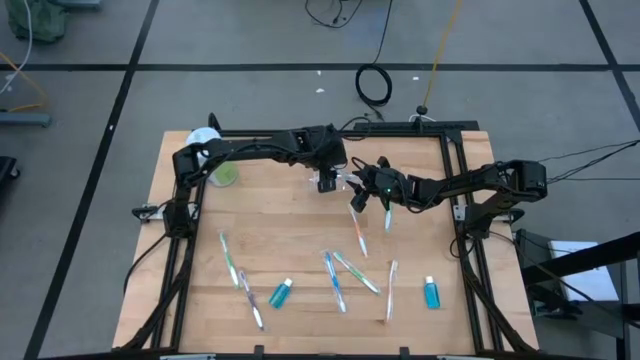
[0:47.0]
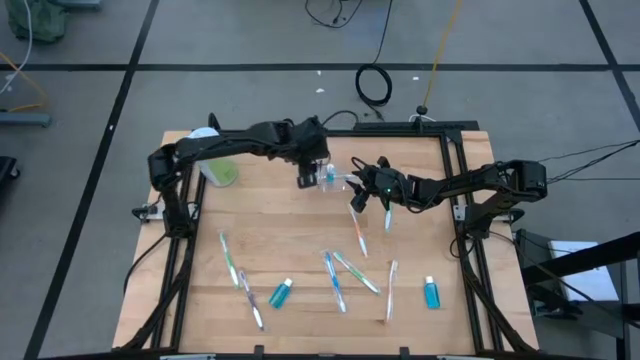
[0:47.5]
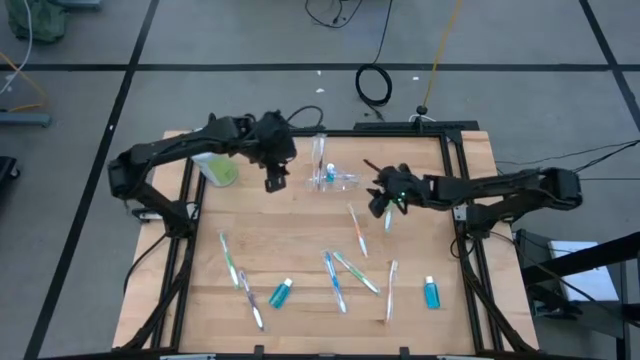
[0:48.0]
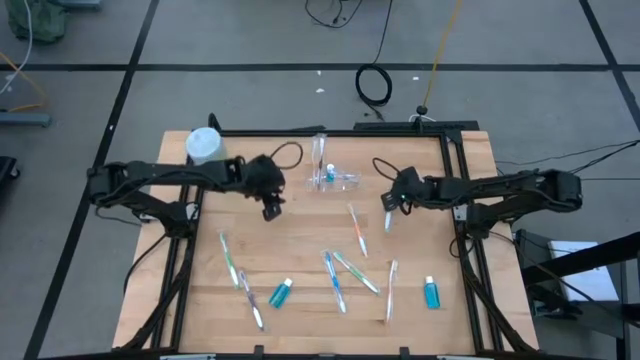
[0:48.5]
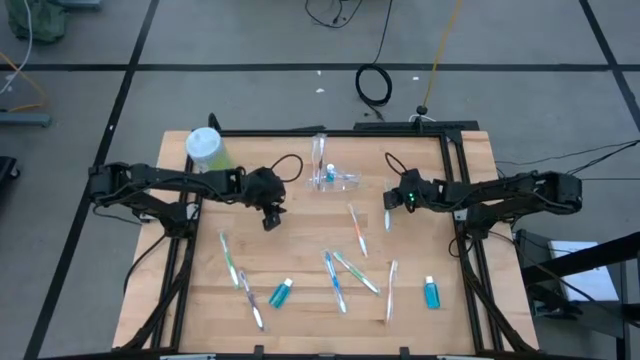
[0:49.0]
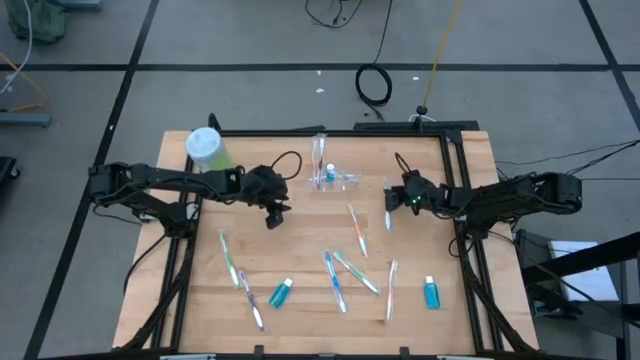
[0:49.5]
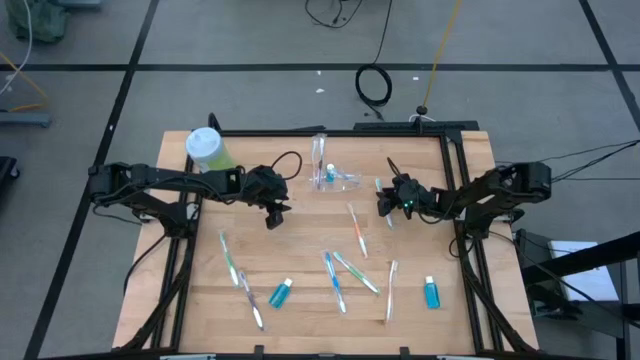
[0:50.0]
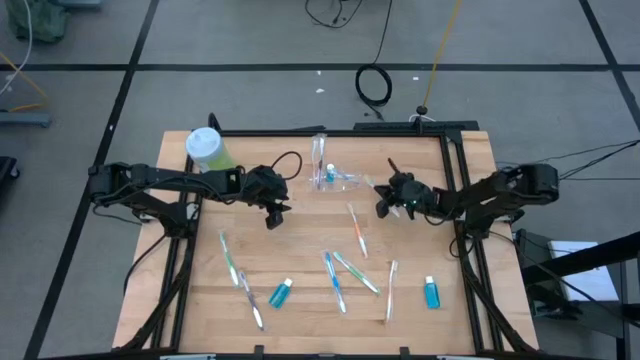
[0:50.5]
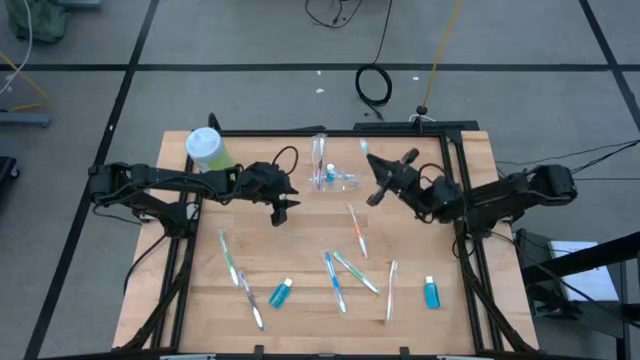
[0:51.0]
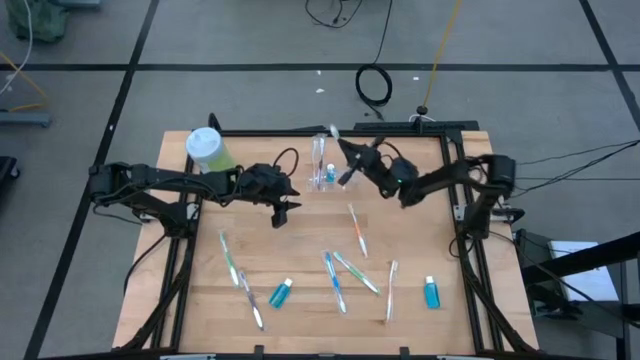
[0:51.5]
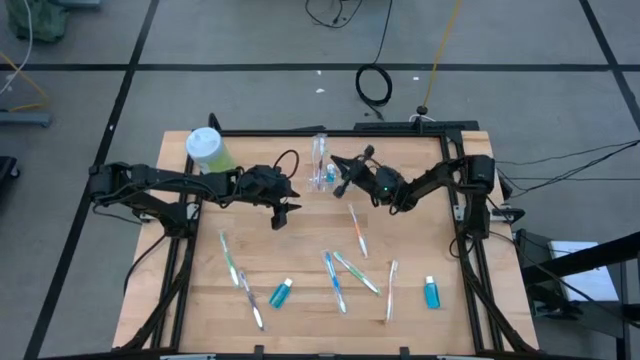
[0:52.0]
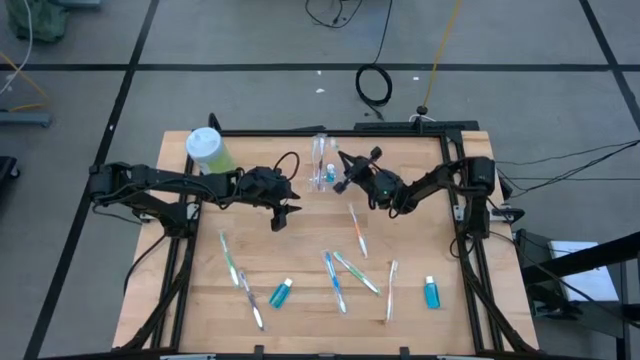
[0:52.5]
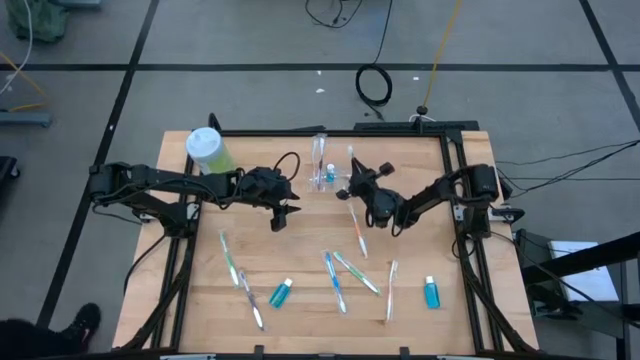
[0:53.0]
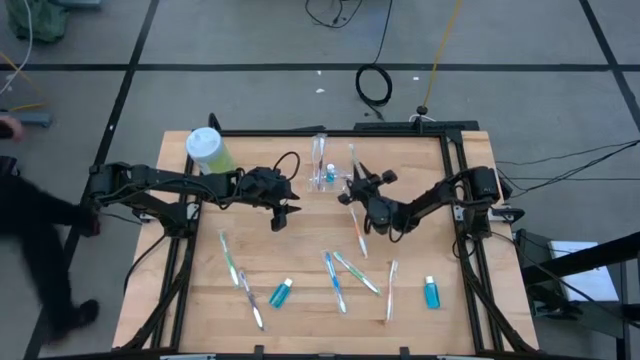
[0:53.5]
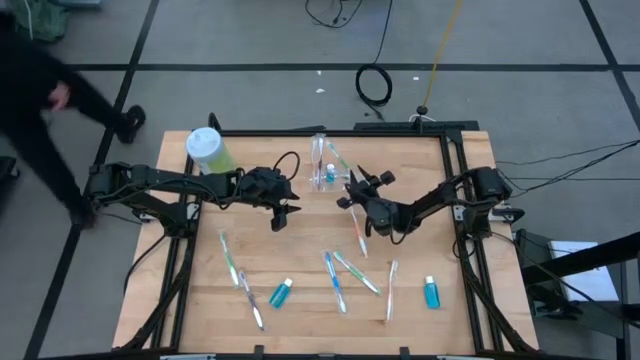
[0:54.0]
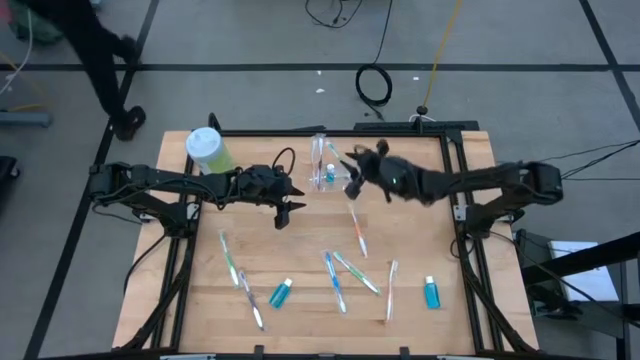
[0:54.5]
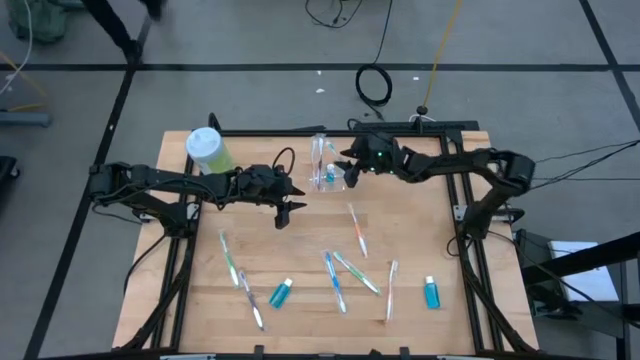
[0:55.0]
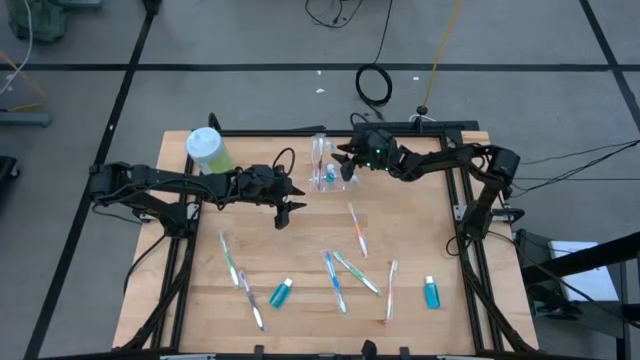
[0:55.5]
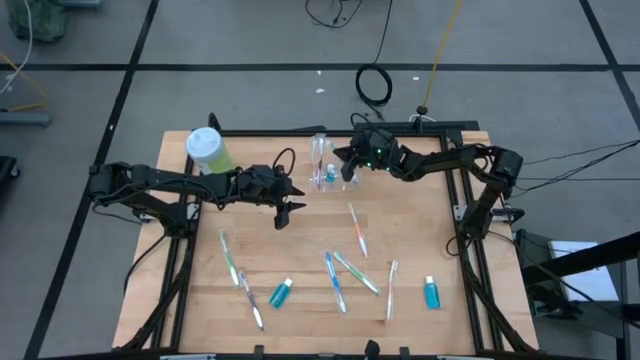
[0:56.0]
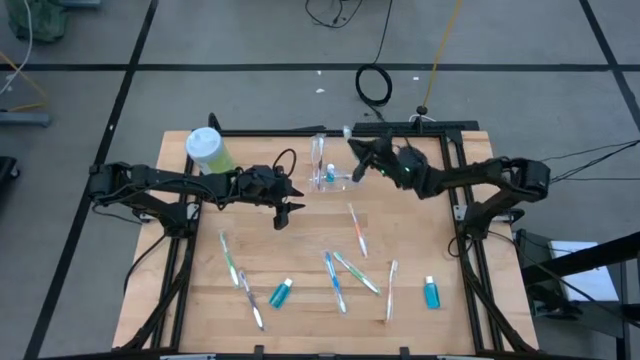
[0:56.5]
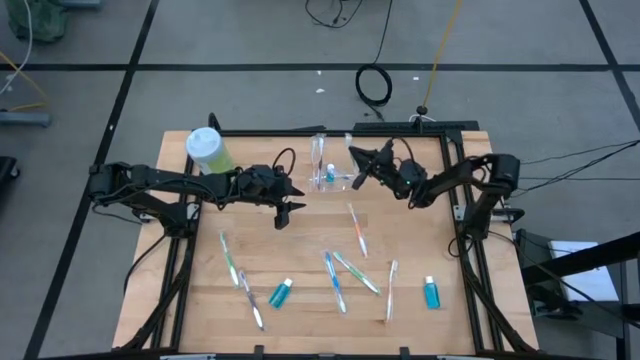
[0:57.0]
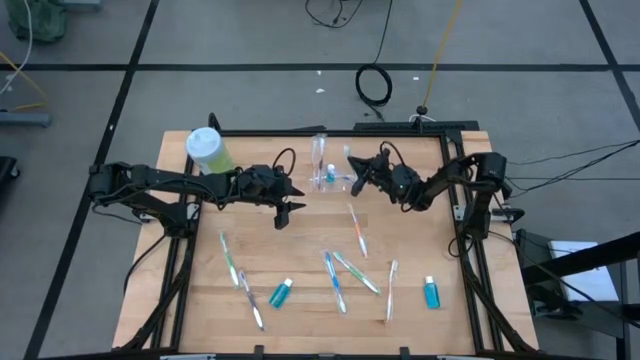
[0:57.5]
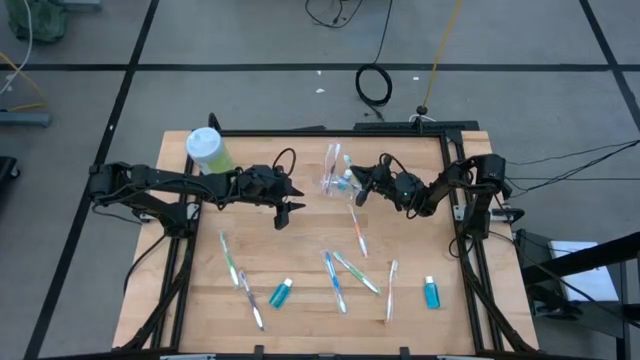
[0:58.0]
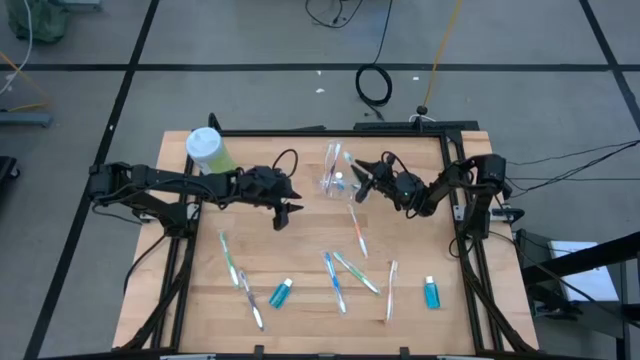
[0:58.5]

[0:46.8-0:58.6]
Task: Pick & Place toothbrushing station
Put the top green toothbrush into the transparent organizer

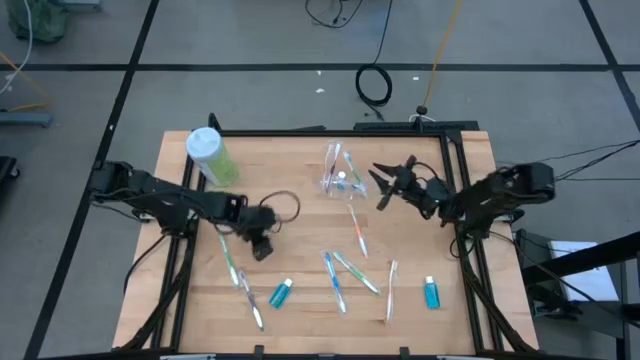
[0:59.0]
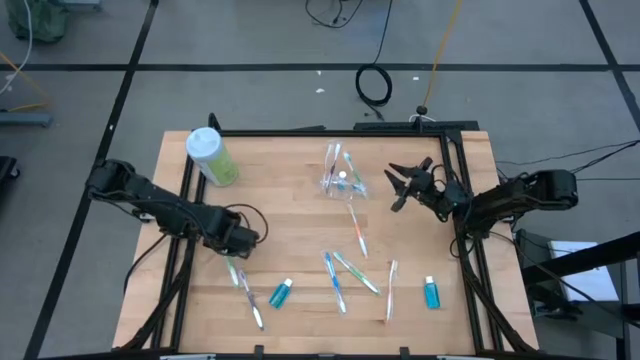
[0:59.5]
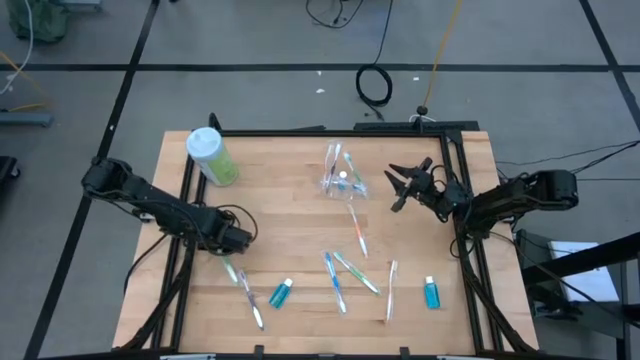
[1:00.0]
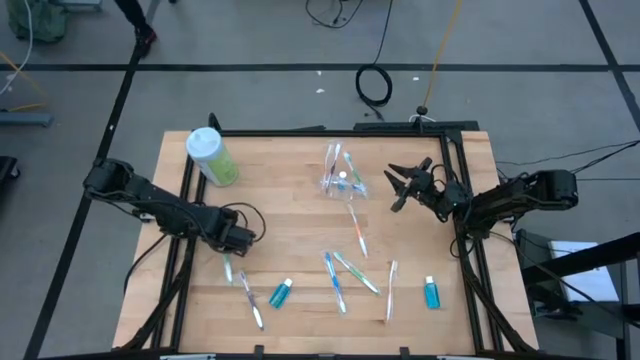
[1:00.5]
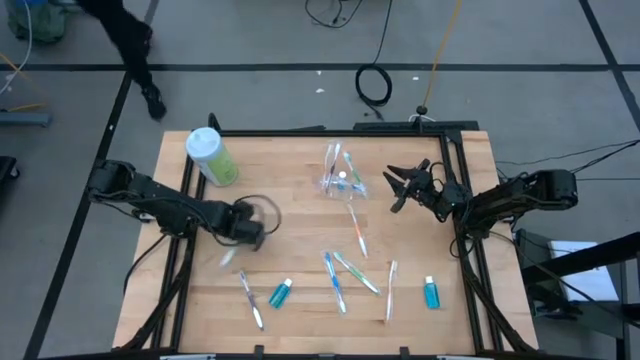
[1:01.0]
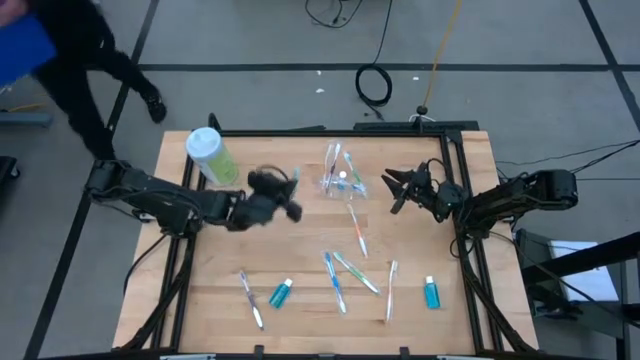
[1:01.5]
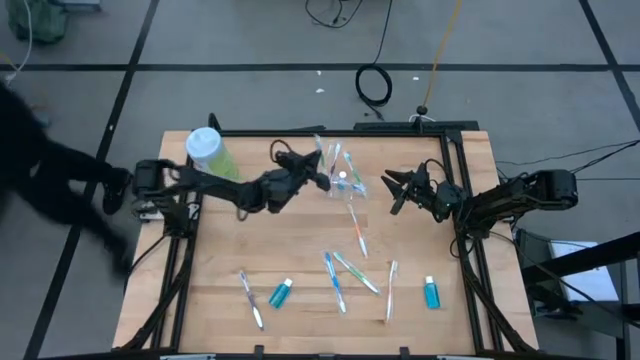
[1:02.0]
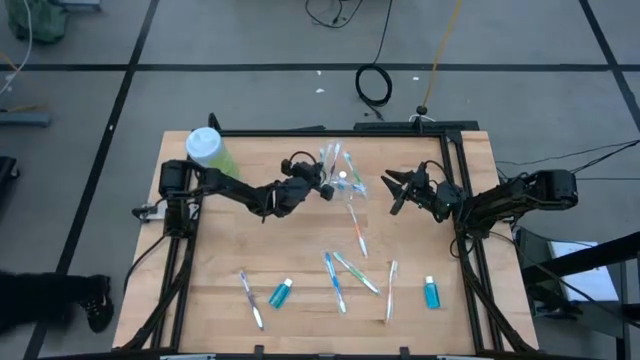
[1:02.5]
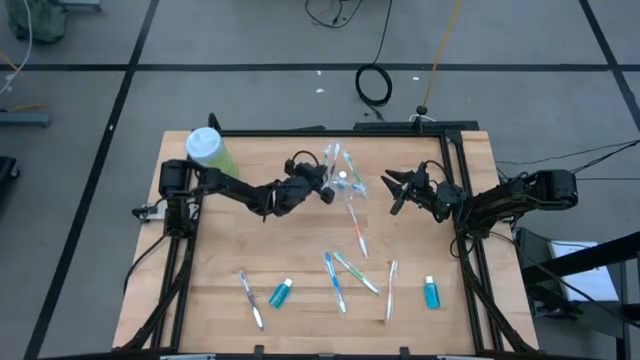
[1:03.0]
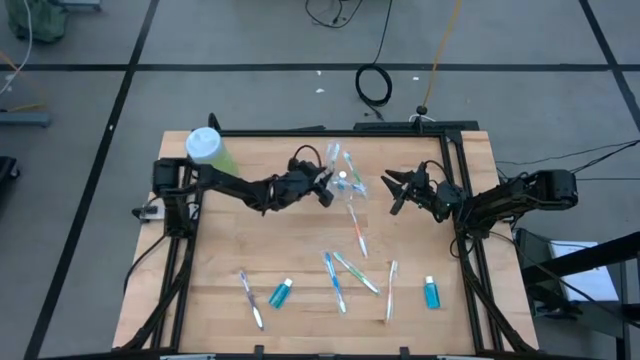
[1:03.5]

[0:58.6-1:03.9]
Put the left green toothbrush into the transparent organizer

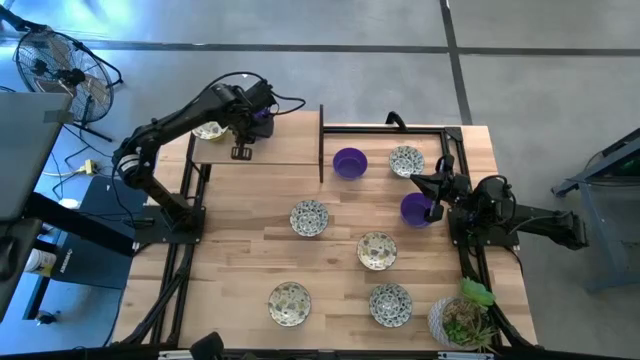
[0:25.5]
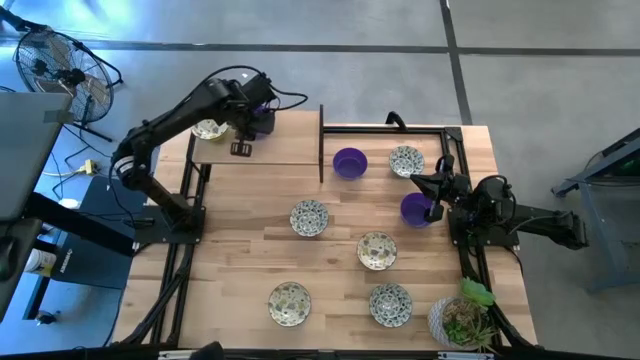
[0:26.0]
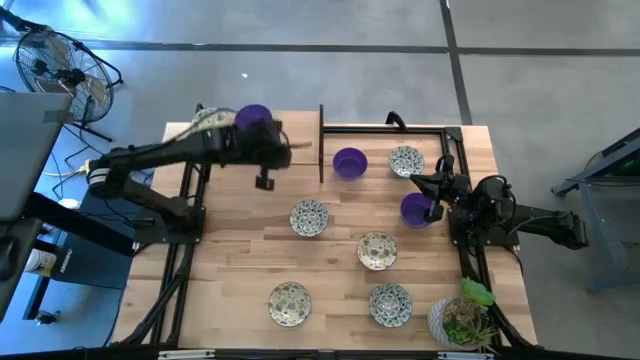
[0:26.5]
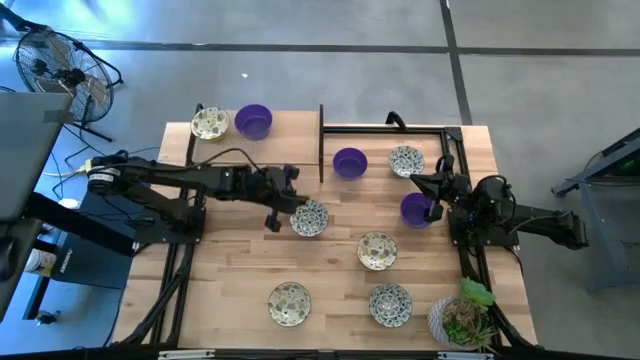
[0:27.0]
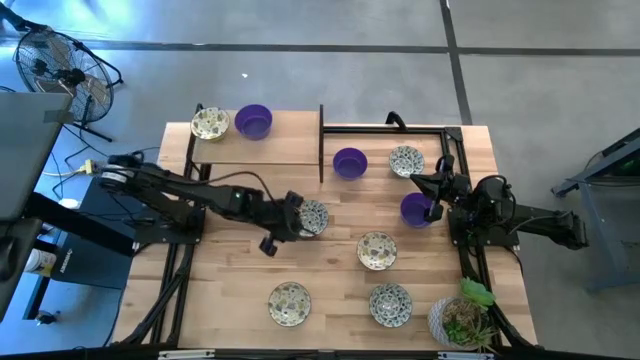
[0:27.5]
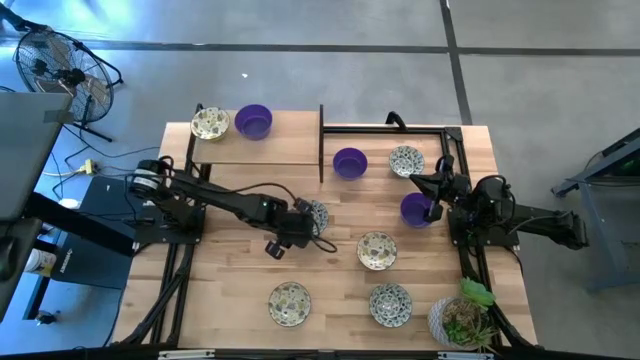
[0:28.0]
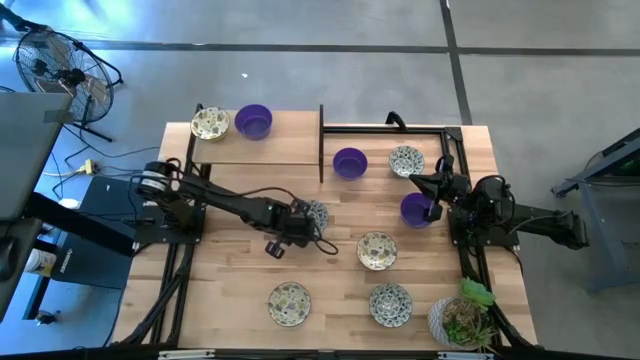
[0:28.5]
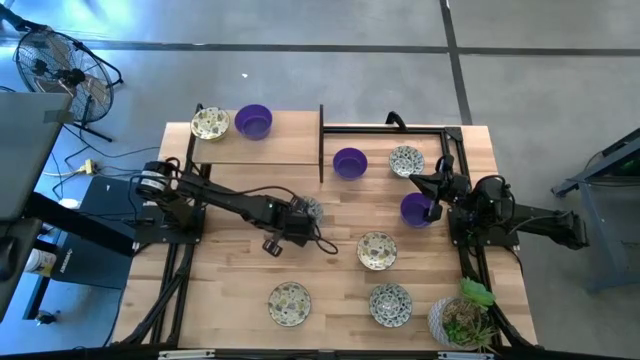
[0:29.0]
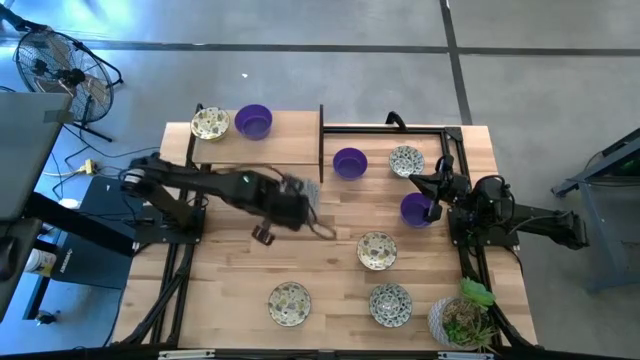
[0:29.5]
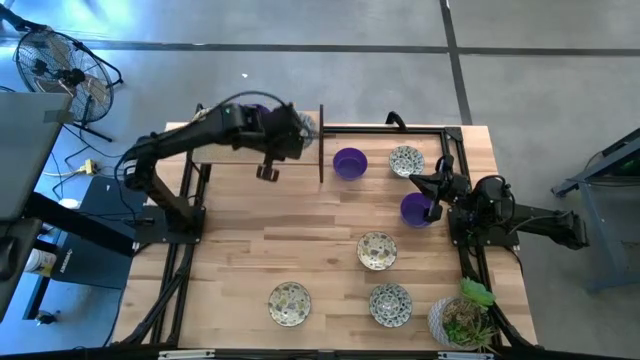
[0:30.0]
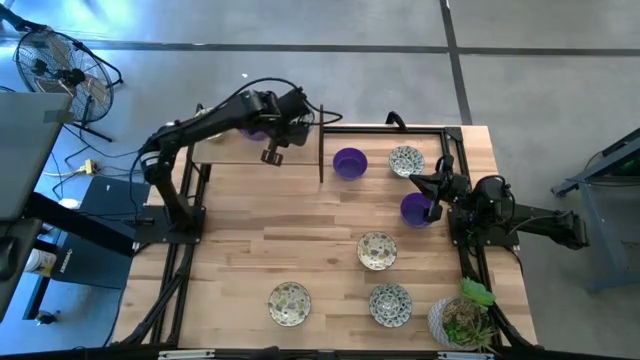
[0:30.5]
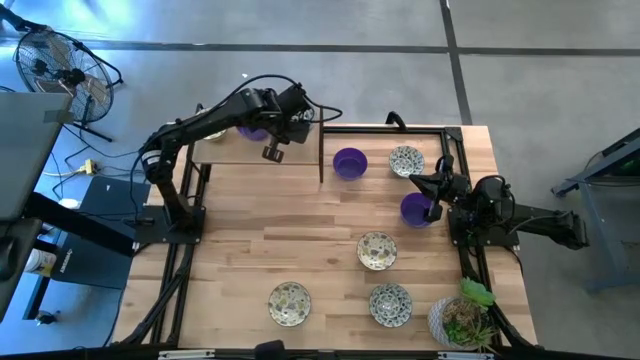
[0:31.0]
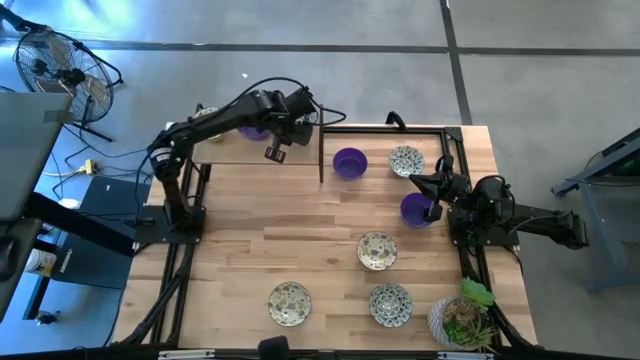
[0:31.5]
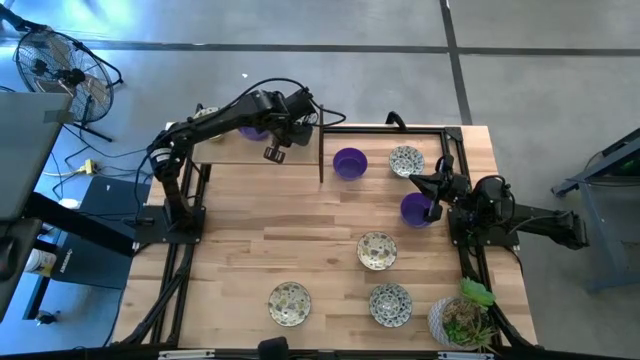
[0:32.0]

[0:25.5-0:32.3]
Task: Pick & Place Mini bowls
Put the middle blue and white patterned bowl on the shelf
